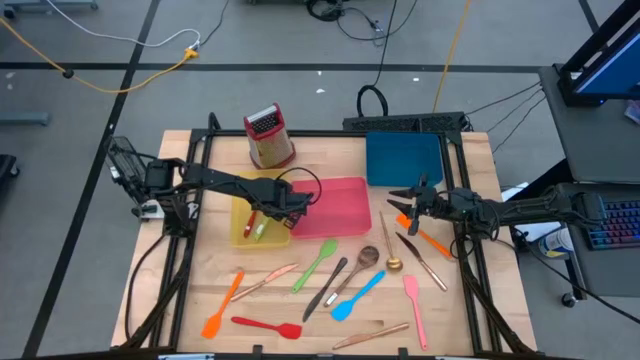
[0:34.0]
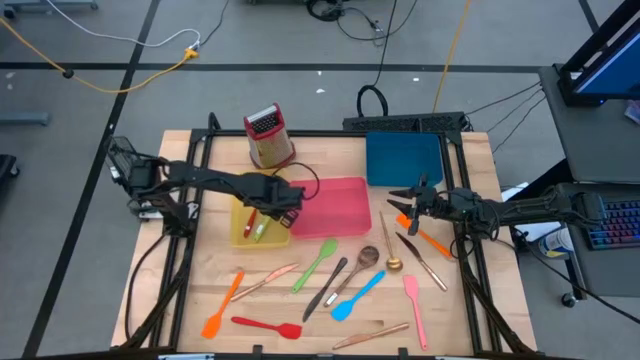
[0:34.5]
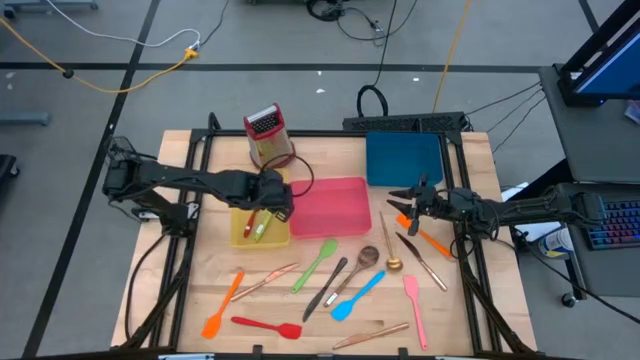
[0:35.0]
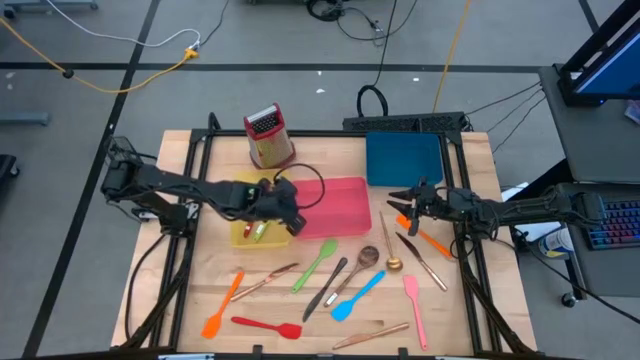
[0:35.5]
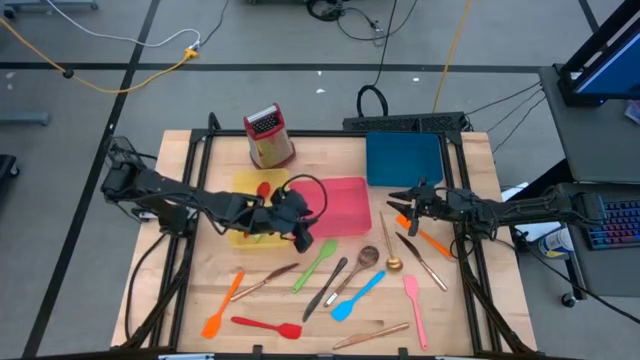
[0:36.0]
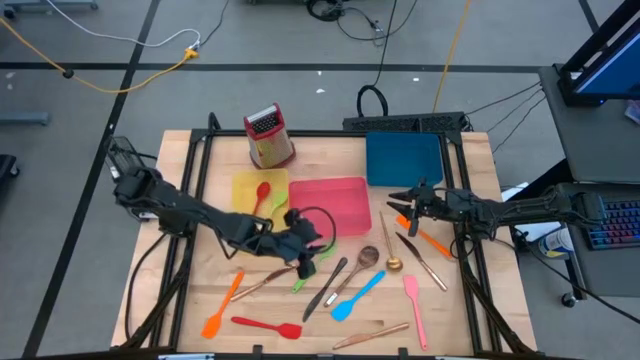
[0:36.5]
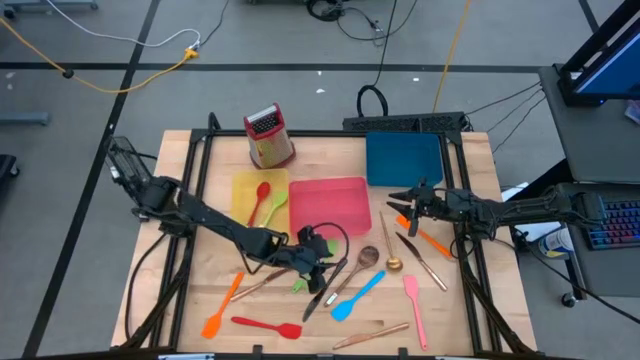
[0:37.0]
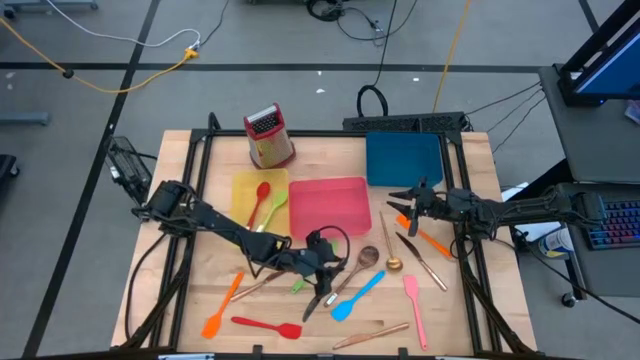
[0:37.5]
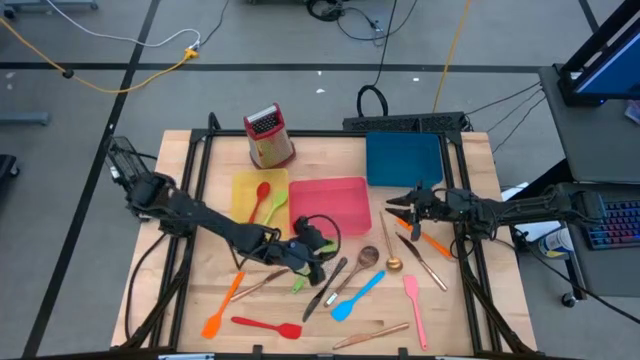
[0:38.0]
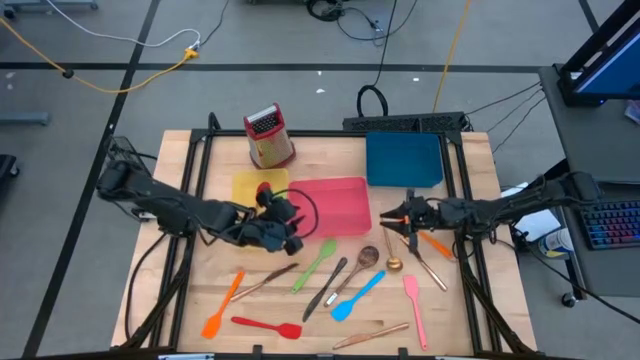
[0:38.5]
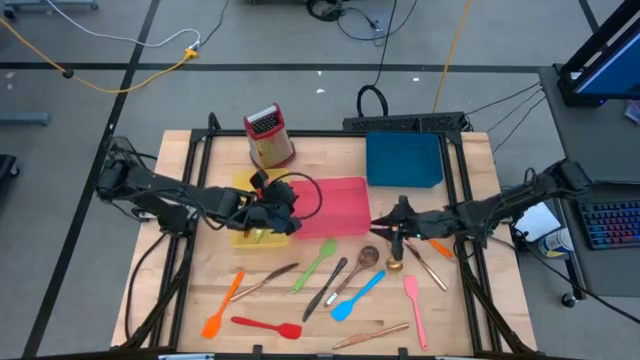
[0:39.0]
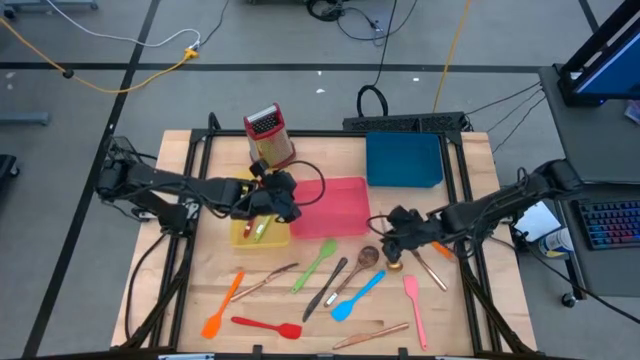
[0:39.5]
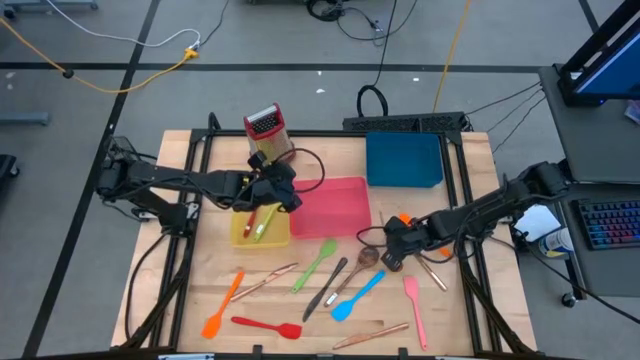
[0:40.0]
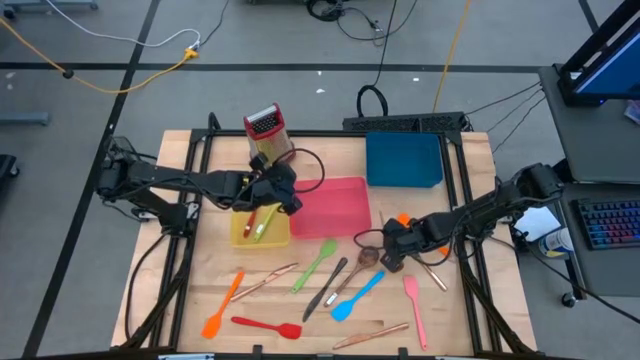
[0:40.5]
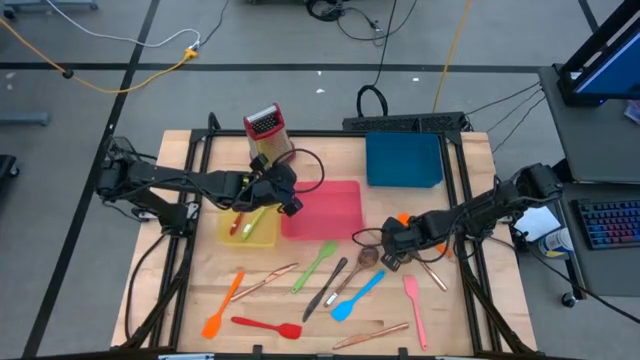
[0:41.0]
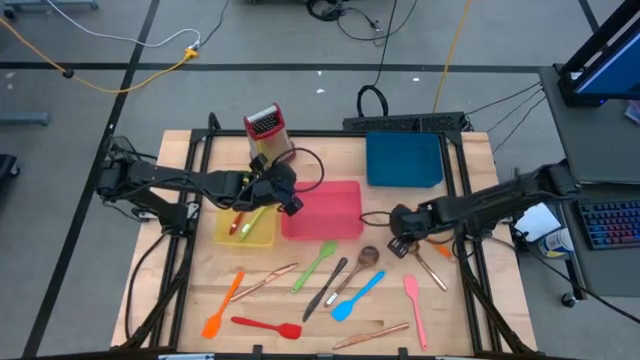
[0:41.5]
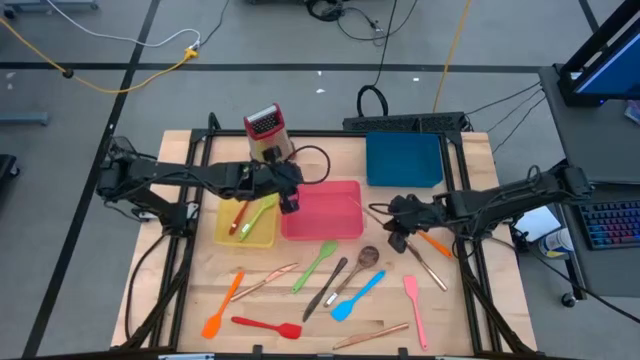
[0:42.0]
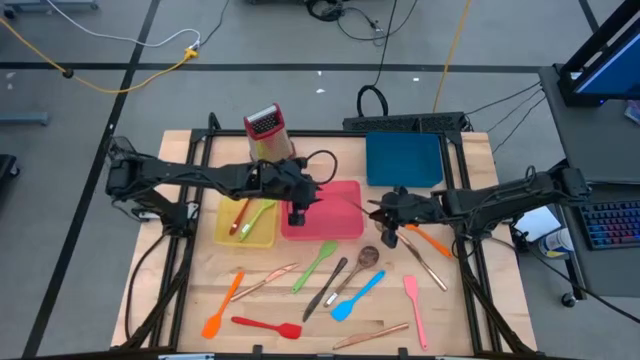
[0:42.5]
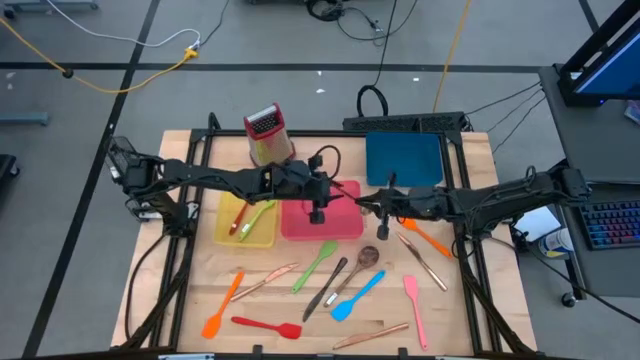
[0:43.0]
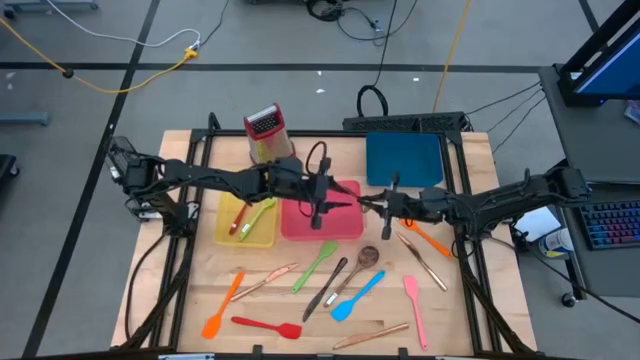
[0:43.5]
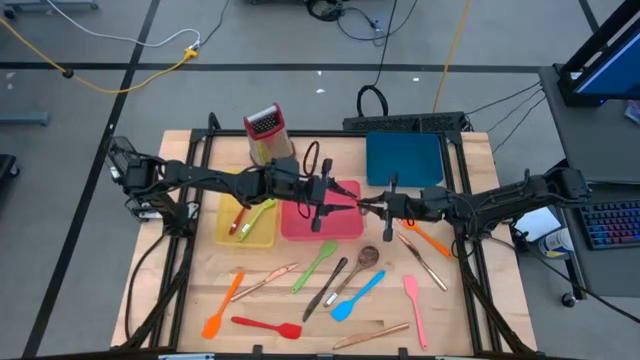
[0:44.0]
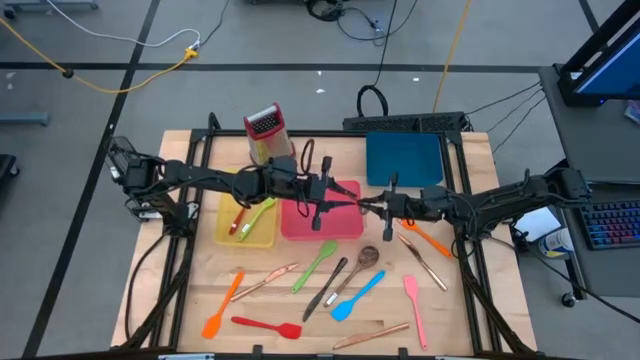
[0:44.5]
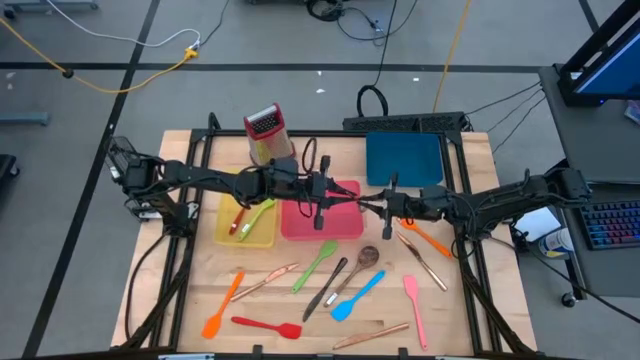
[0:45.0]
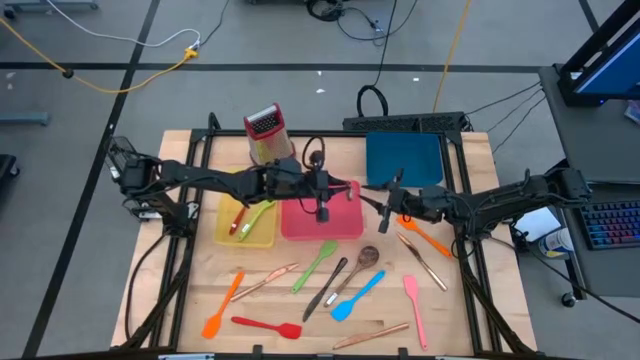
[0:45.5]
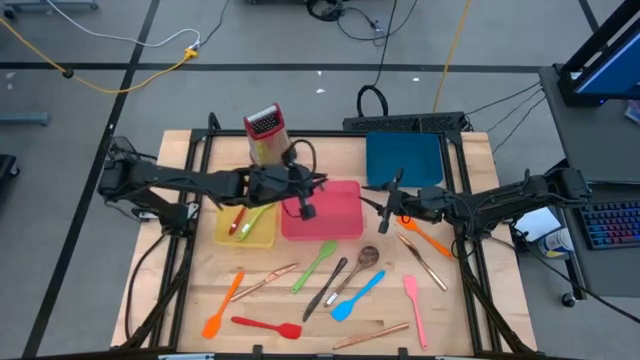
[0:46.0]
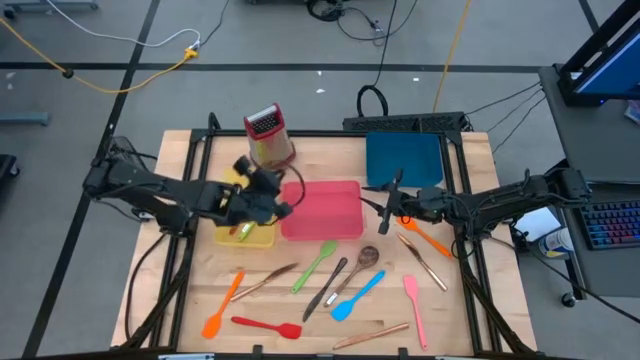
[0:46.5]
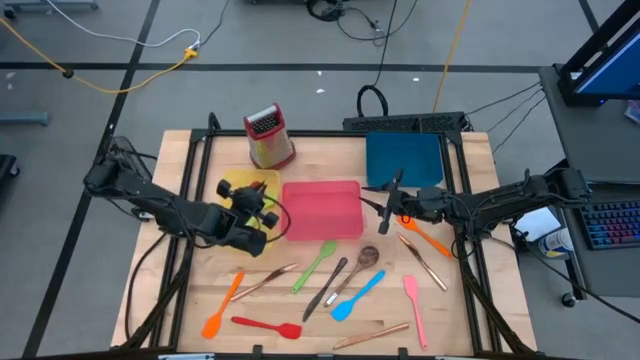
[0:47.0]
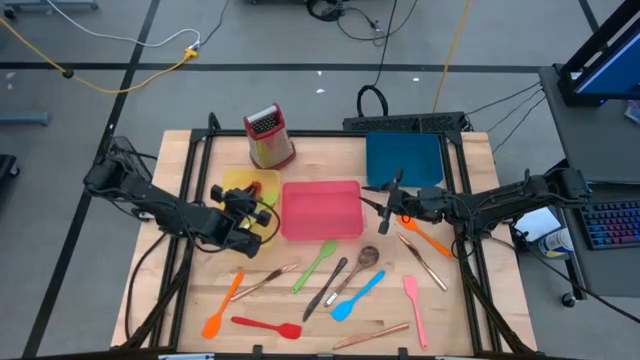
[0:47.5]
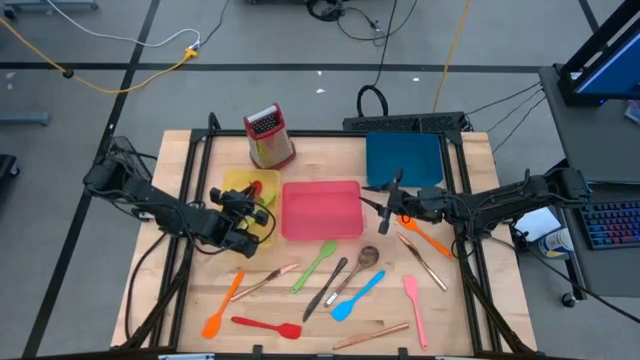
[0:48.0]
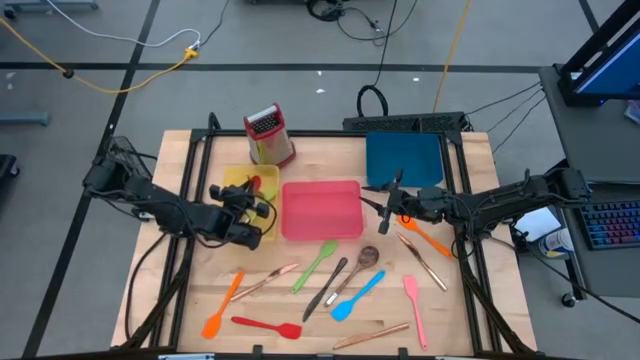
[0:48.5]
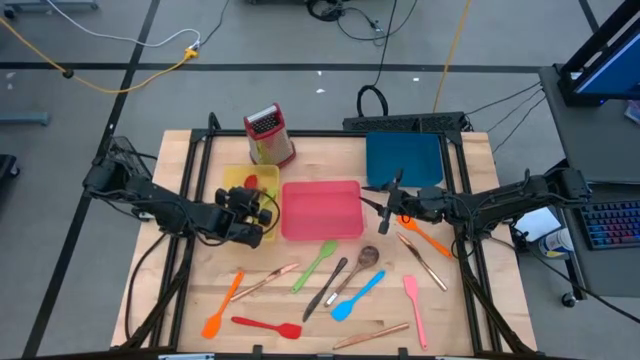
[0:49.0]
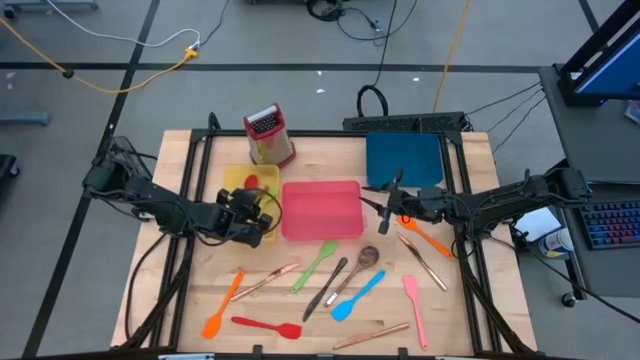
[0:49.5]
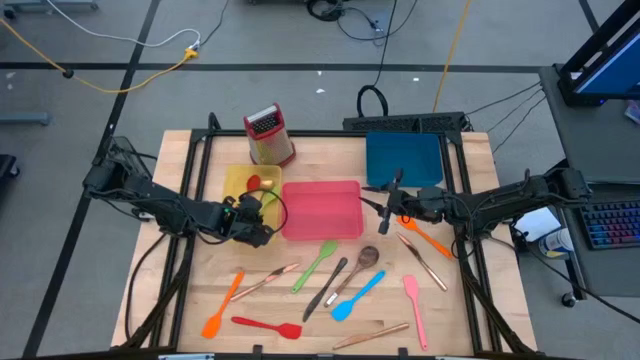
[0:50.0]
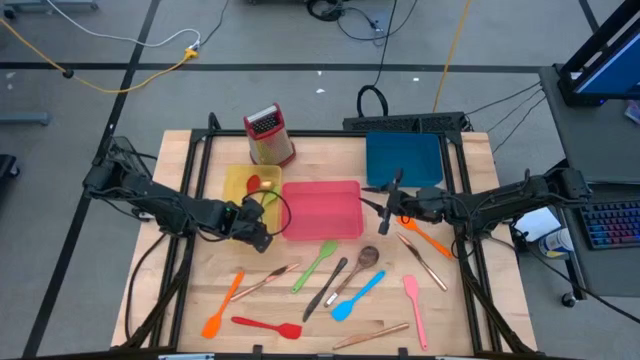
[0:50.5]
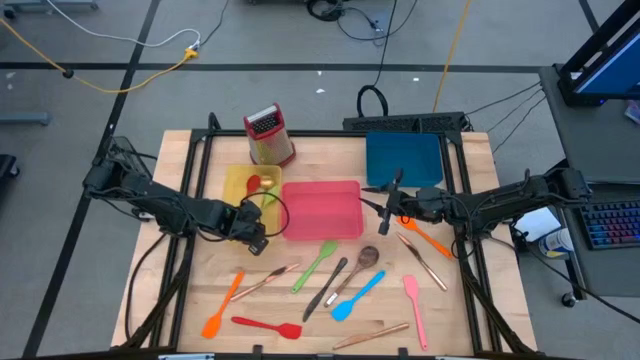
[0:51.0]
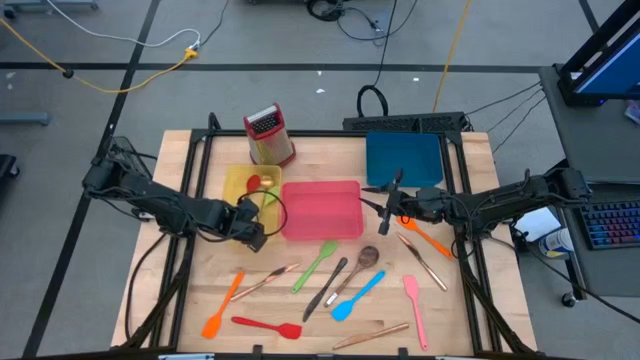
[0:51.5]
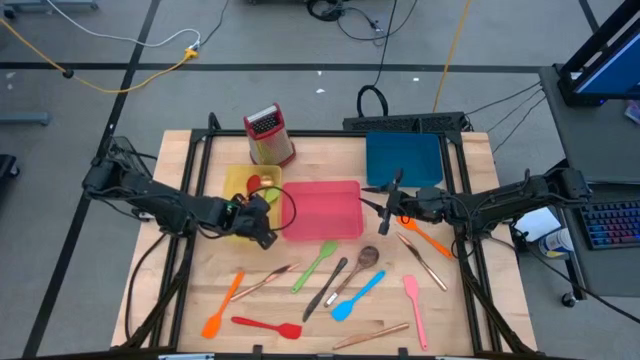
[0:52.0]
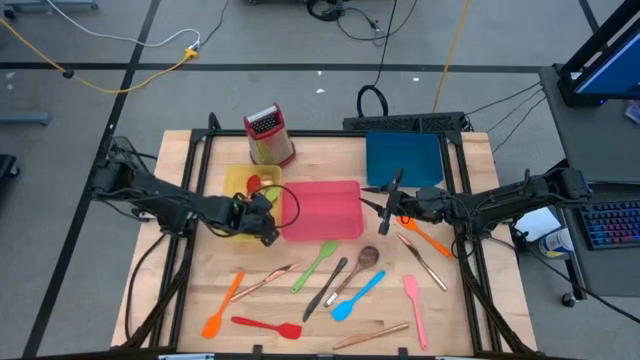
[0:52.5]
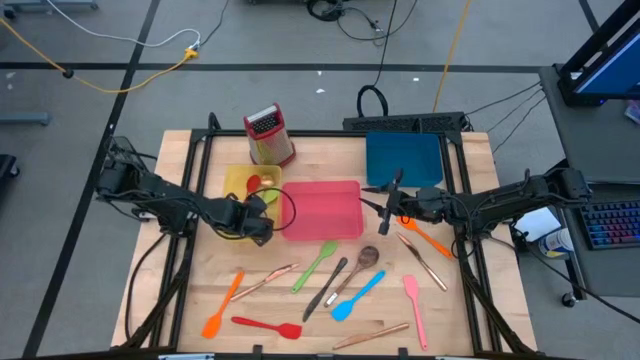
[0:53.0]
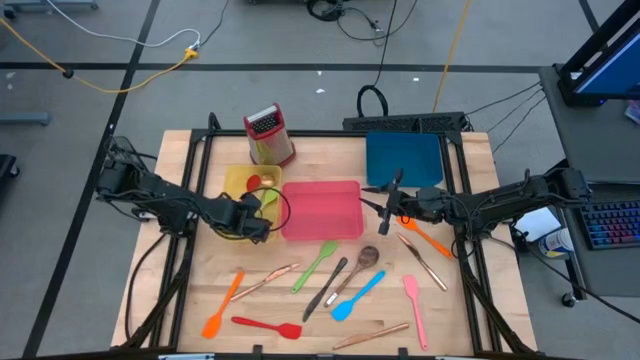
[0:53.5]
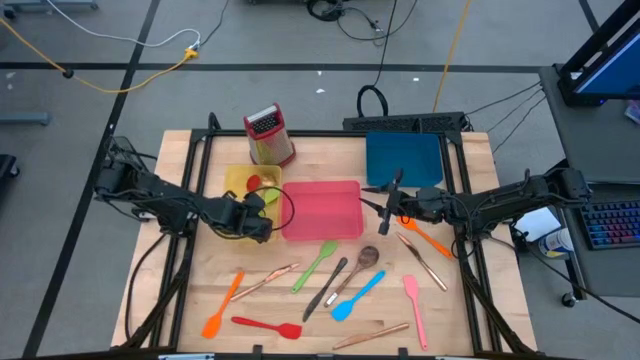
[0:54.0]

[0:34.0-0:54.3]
Task: Pick & Place Kitchen Items
Put the gold serving spoon into the yellow bin

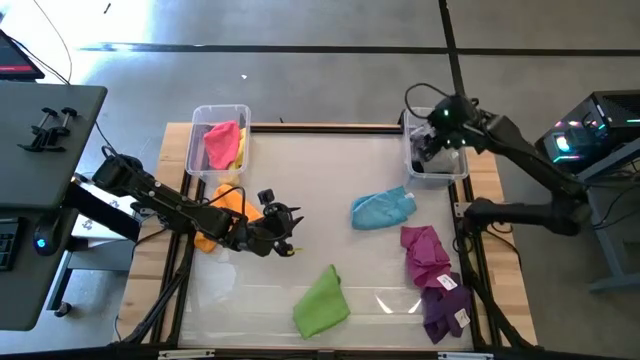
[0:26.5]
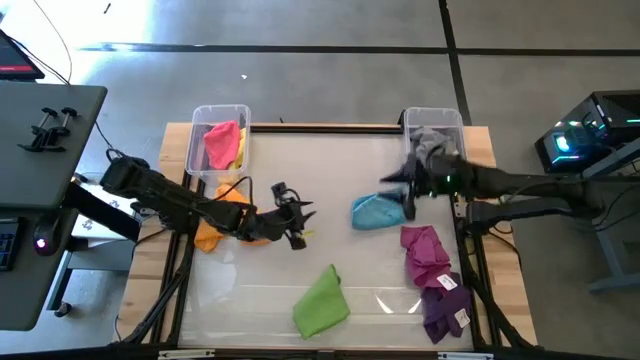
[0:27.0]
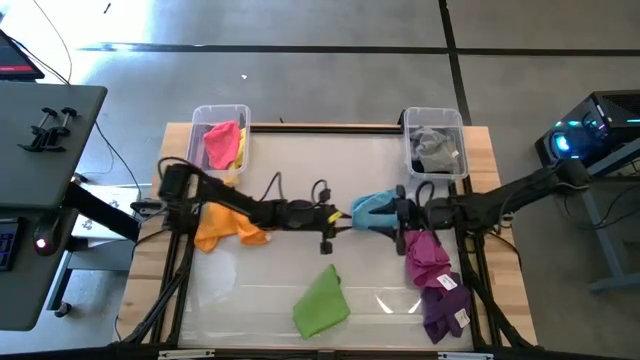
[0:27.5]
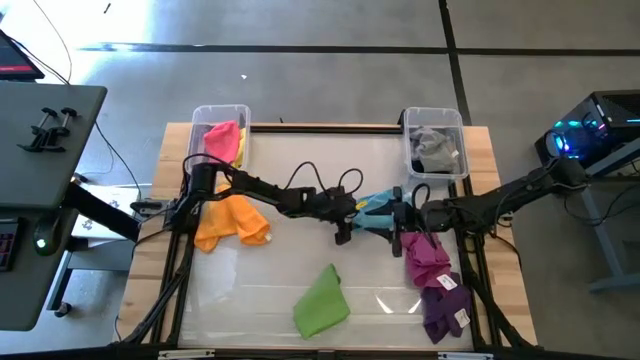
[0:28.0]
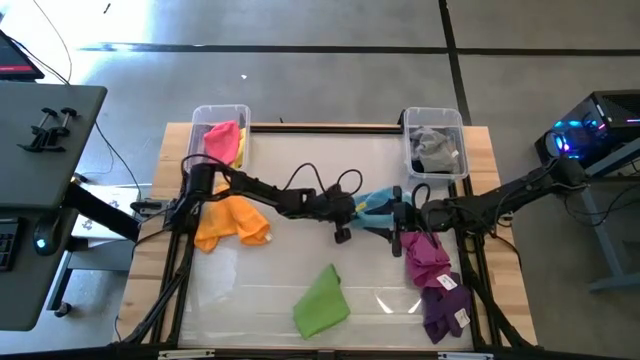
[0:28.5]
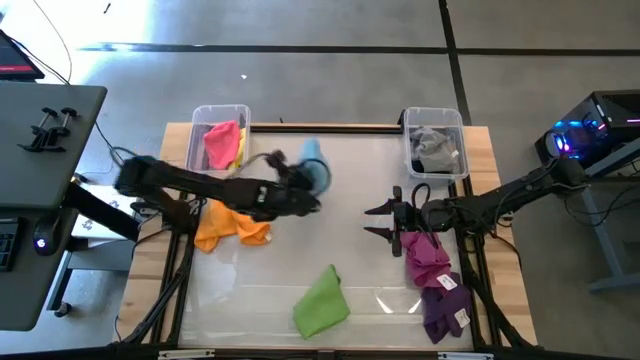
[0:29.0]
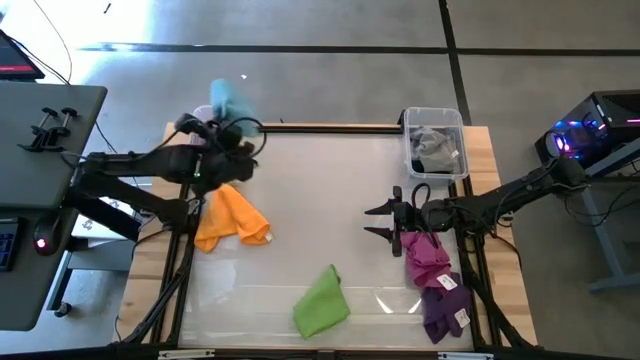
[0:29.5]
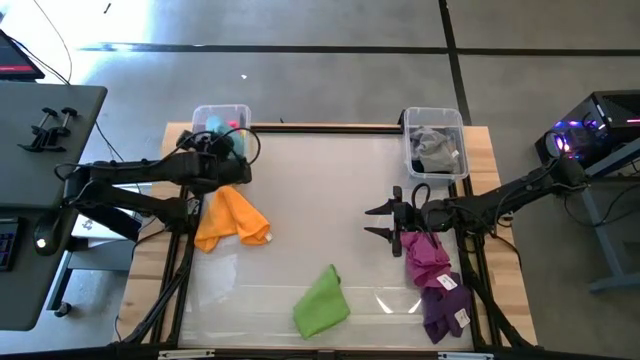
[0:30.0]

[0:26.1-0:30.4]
Task: Sort towels by color in basket
Put the blue towel into the left transparent bin
